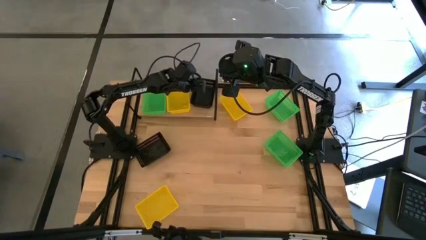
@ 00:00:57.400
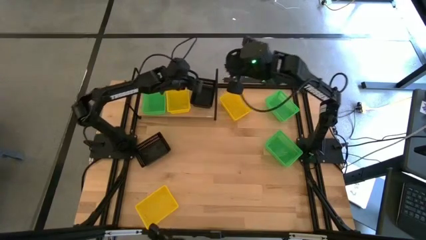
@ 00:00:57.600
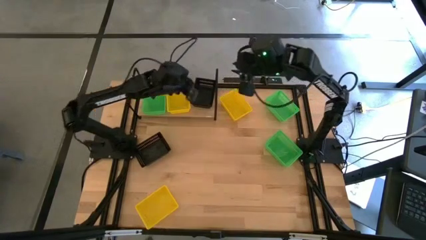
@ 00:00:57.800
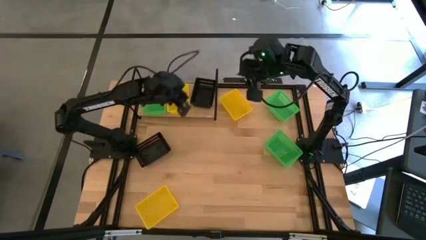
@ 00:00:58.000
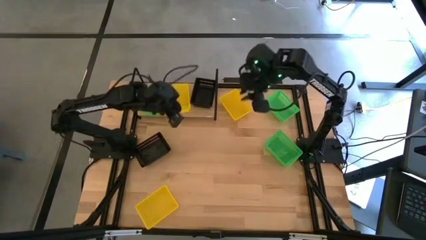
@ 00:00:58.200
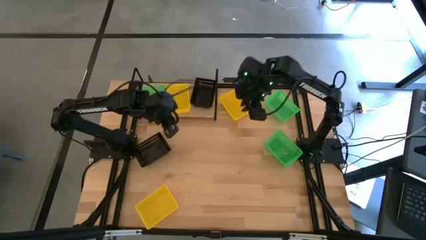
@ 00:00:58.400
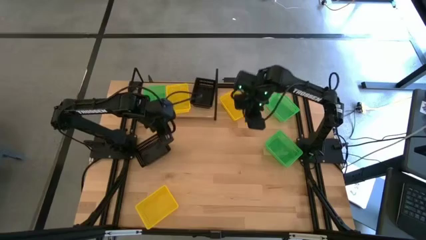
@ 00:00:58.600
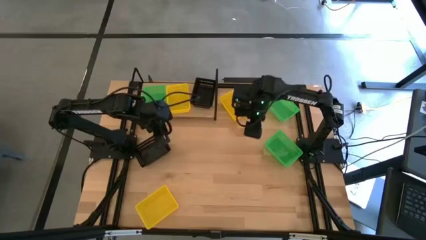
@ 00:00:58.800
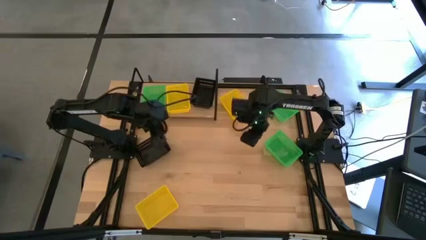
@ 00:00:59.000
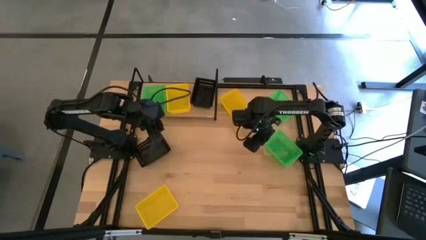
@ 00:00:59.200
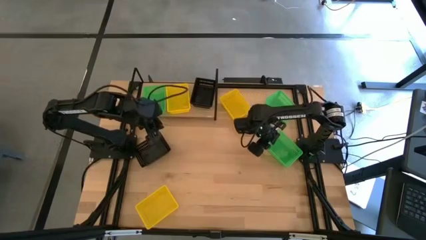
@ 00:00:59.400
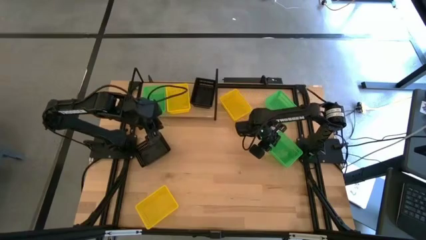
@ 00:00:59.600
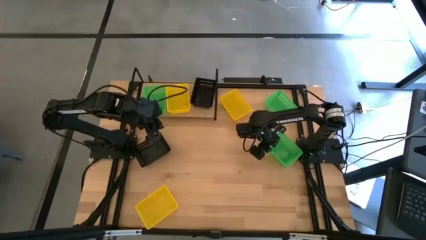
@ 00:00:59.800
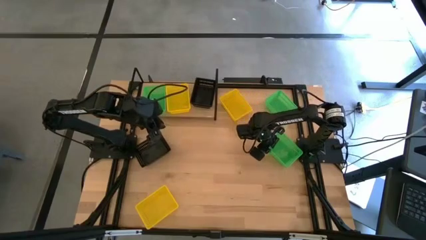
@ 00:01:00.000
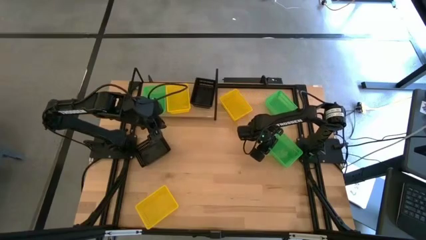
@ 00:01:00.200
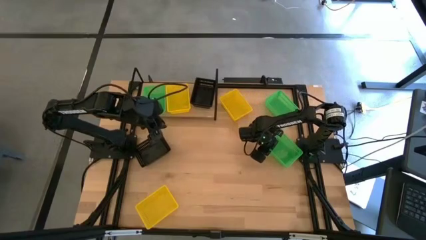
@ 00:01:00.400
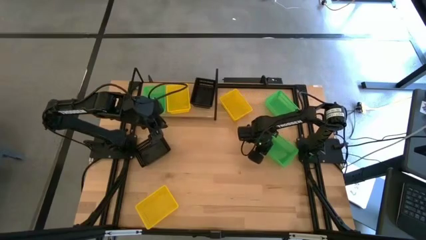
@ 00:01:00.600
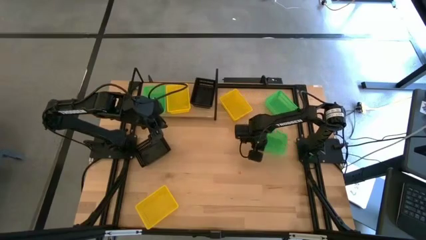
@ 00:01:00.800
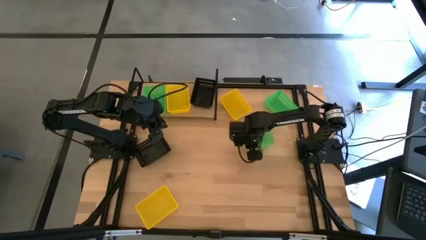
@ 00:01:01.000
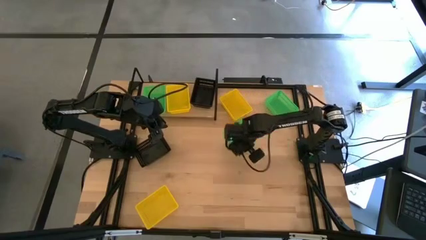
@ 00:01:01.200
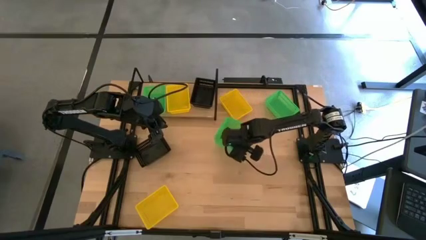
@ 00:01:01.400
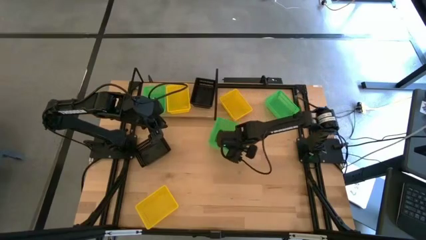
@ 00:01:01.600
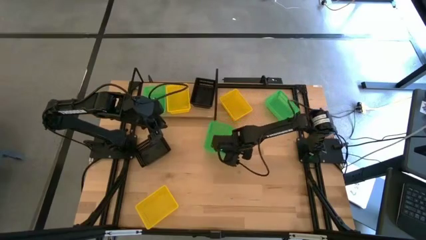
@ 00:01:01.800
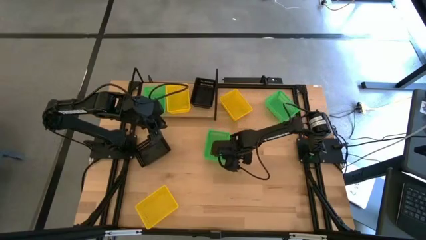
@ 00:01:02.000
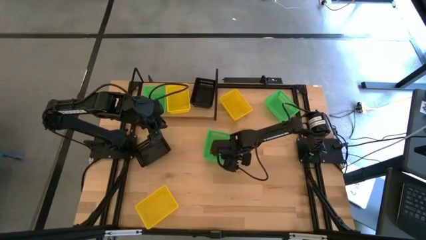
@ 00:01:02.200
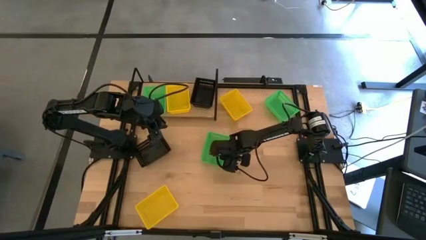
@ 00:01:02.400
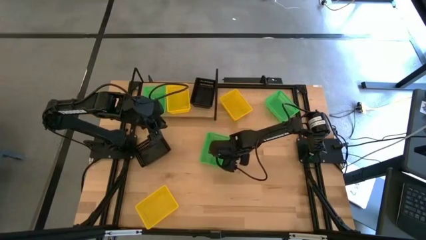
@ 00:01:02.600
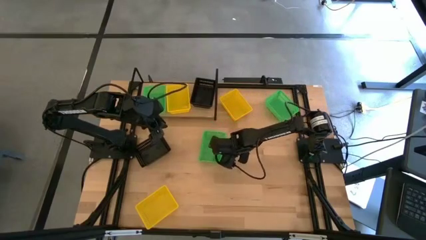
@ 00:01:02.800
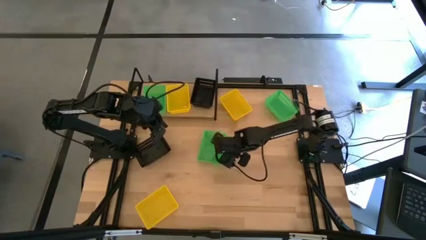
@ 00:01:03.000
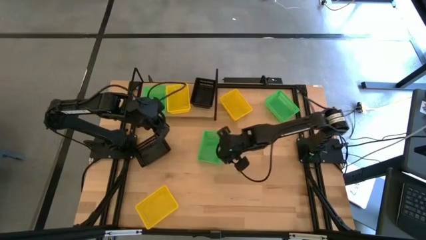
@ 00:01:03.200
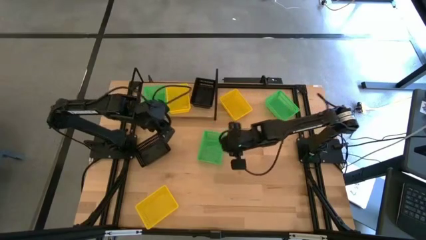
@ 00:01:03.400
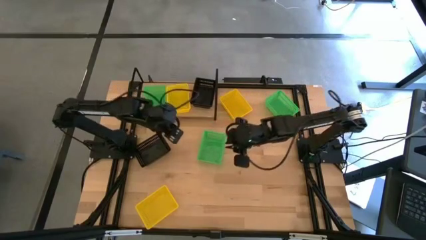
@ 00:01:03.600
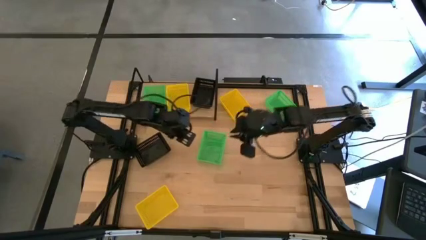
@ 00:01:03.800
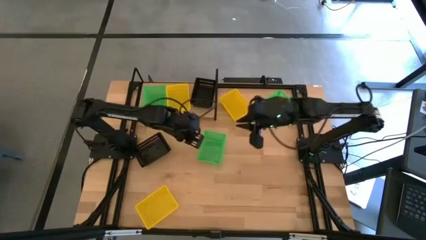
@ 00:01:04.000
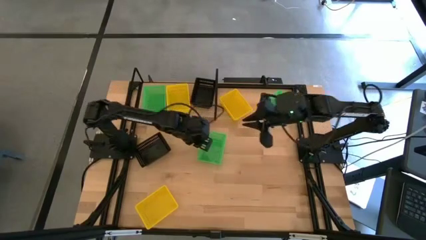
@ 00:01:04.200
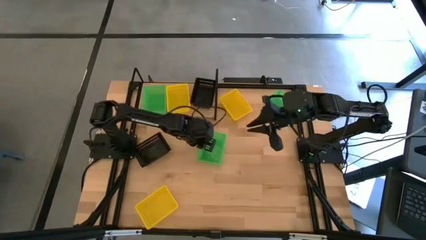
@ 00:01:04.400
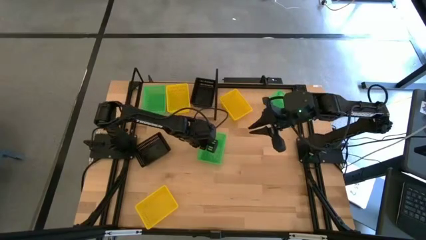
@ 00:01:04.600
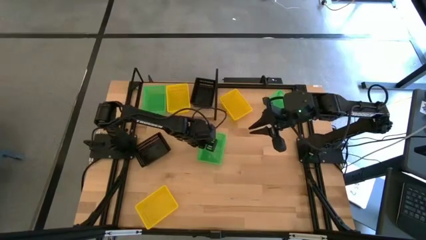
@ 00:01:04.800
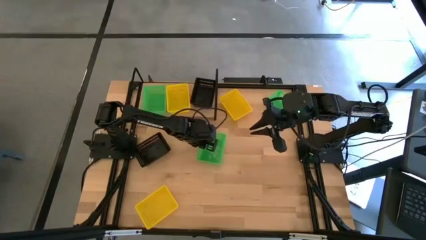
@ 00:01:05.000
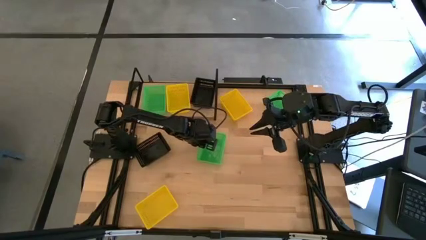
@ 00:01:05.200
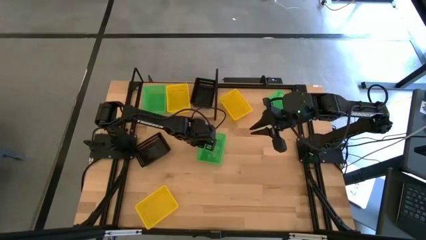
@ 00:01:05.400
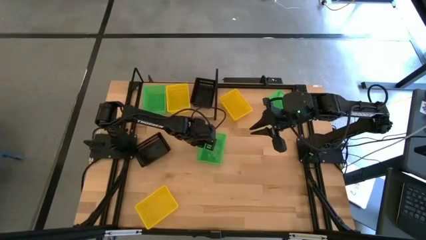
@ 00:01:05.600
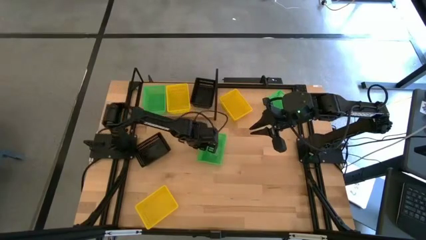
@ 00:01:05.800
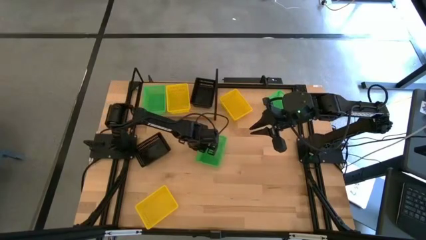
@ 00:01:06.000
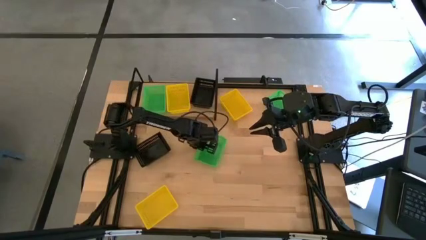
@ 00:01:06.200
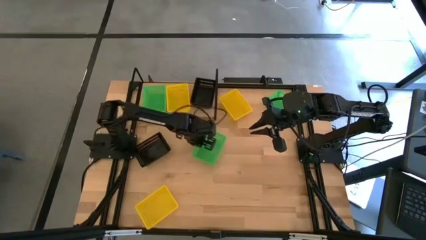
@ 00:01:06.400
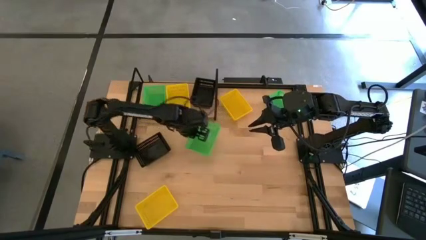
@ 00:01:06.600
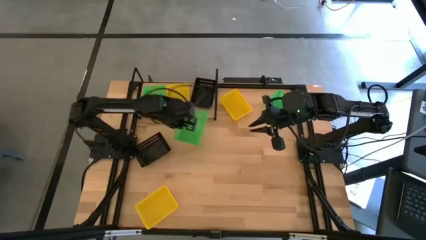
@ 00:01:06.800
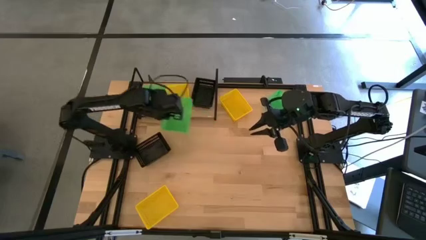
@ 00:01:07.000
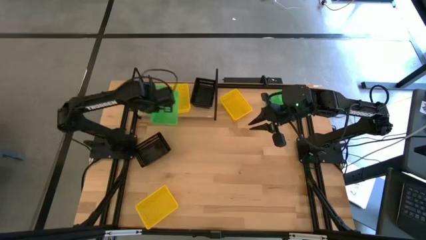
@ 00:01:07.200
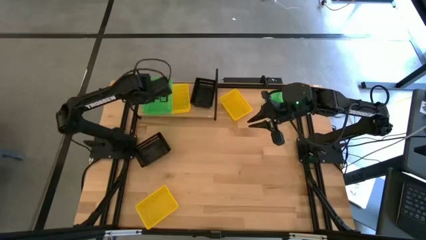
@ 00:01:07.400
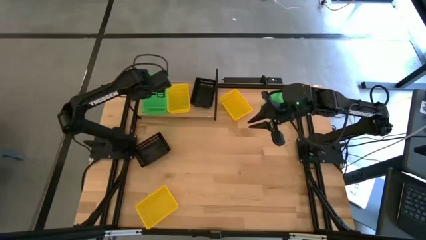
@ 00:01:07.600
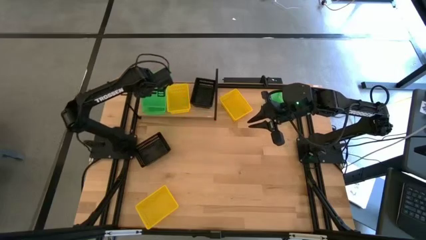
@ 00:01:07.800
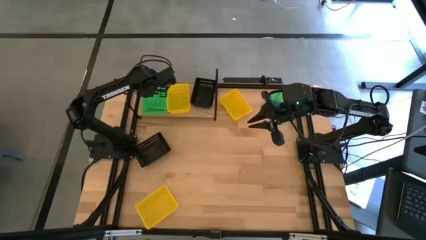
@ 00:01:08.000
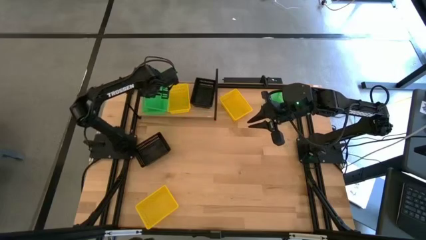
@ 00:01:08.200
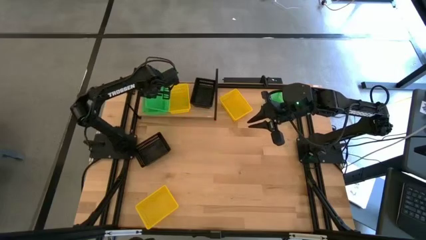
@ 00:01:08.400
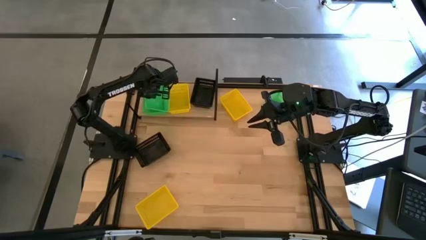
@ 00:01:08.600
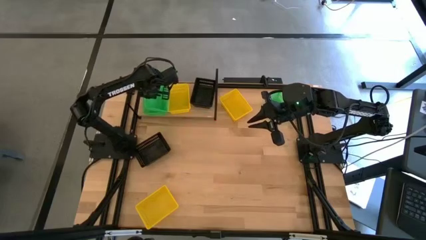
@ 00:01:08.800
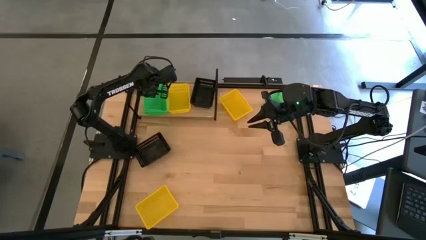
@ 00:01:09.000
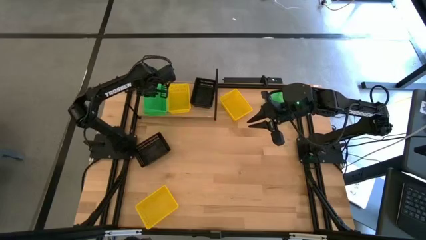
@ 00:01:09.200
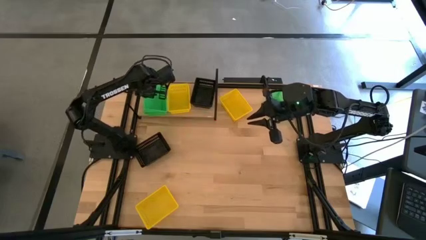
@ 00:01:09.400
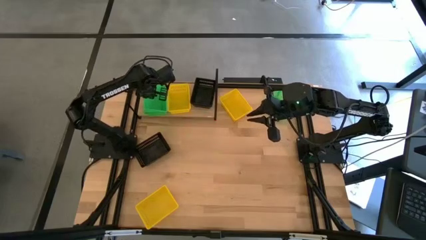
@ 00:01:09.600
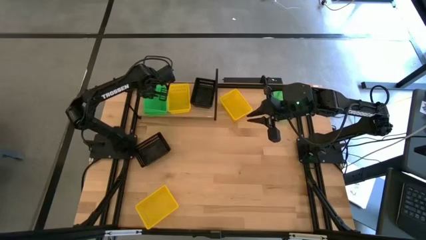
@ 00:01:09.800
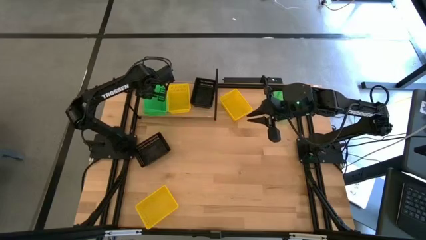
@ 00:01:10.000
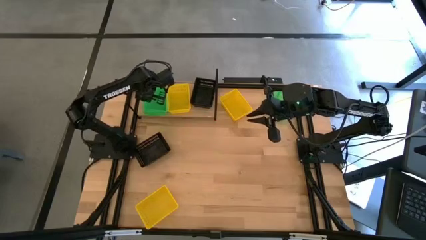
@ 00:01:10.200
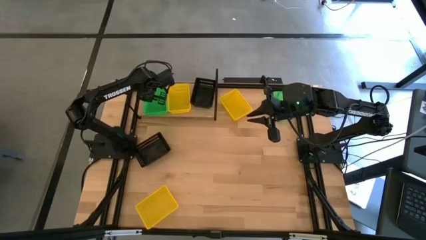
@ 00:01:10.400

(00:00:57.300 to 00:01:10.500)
Task: Stack baskets on shelf by color
Stack the bottom green basket on the green basket on the shelf
